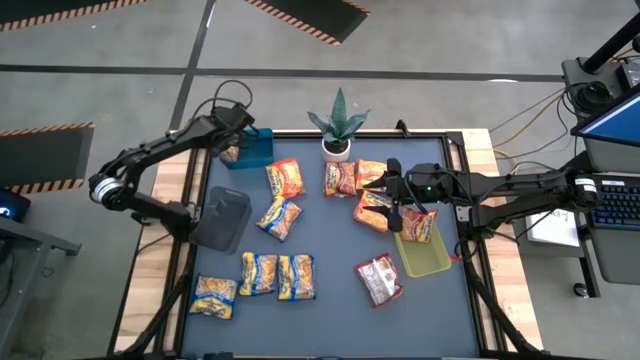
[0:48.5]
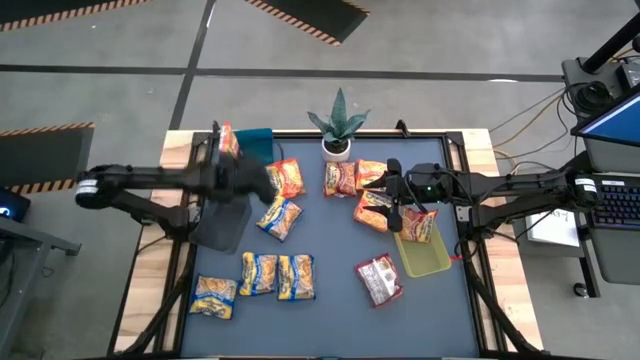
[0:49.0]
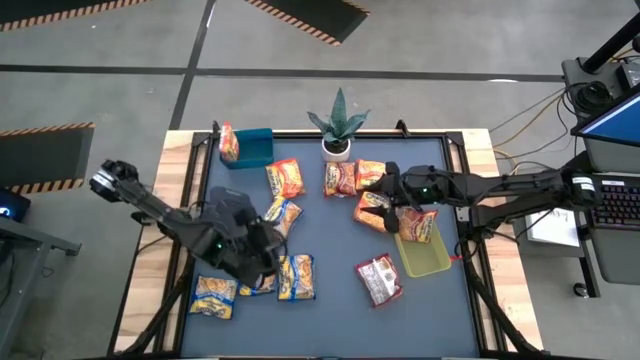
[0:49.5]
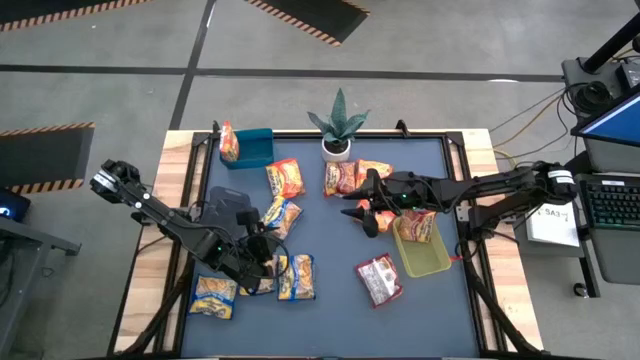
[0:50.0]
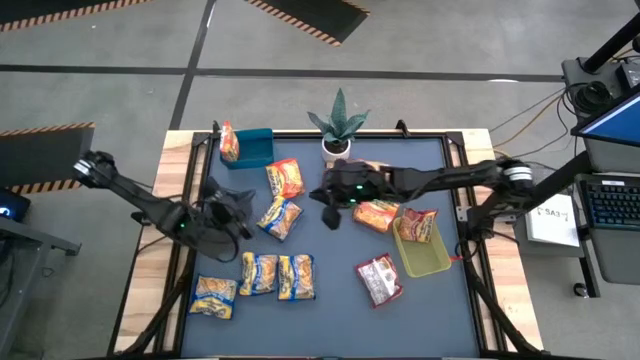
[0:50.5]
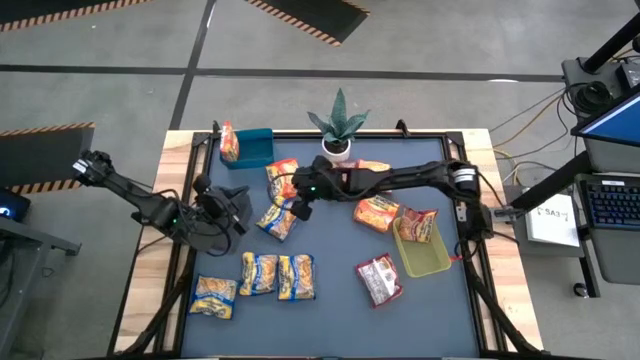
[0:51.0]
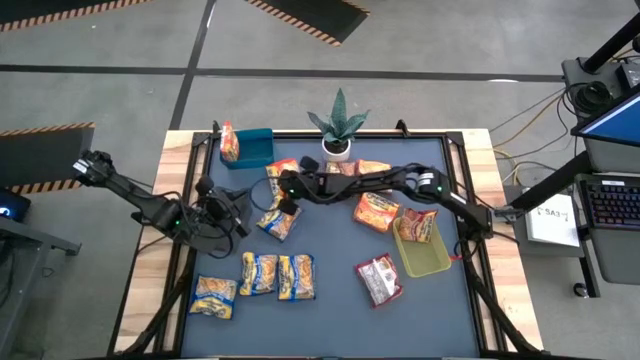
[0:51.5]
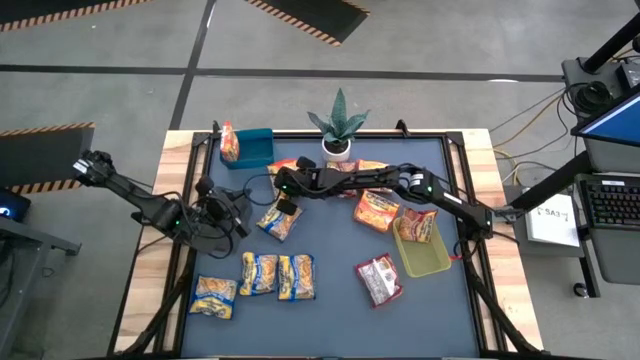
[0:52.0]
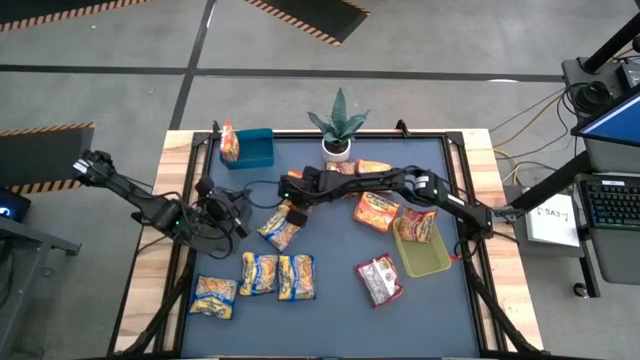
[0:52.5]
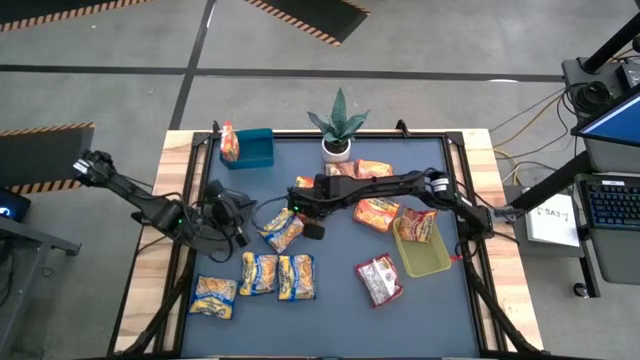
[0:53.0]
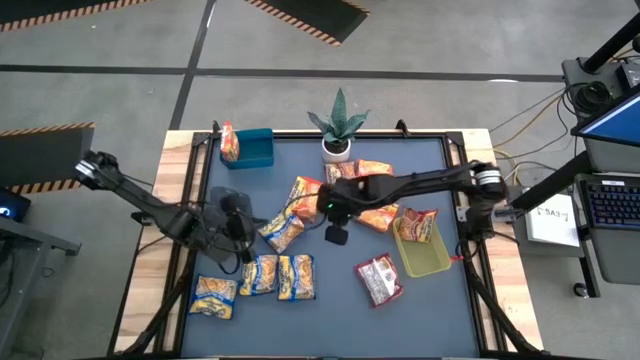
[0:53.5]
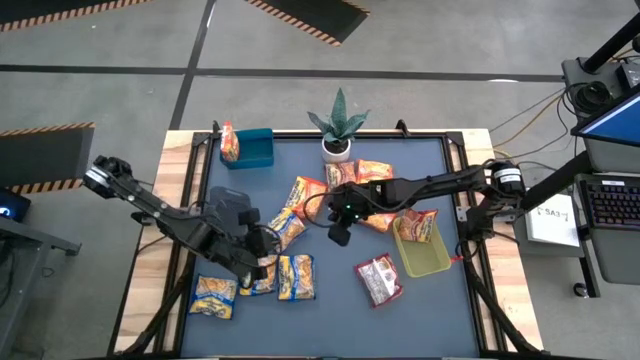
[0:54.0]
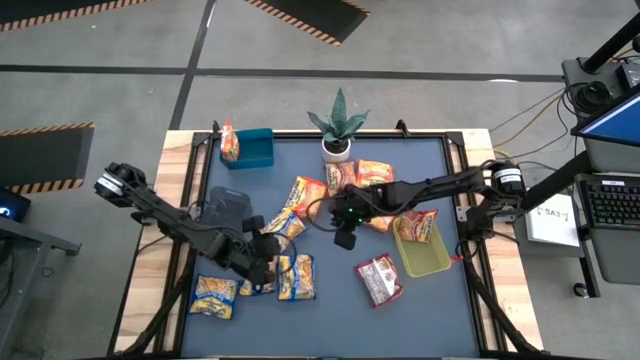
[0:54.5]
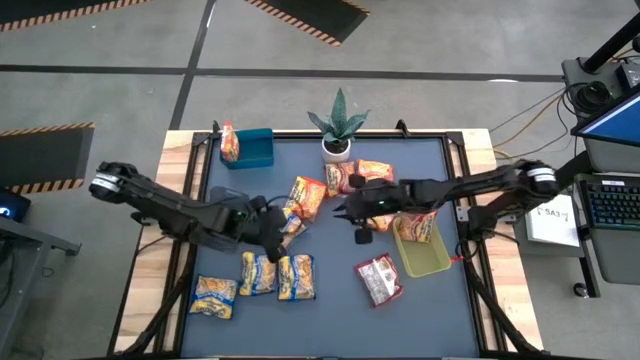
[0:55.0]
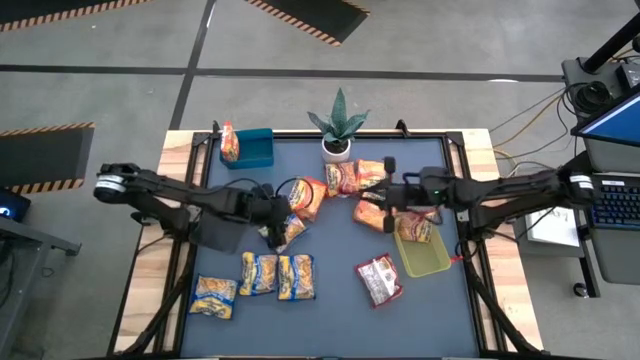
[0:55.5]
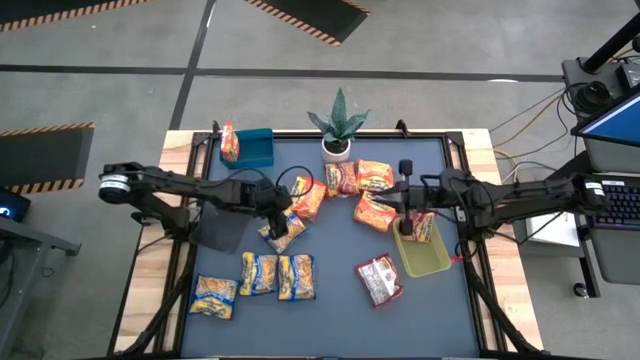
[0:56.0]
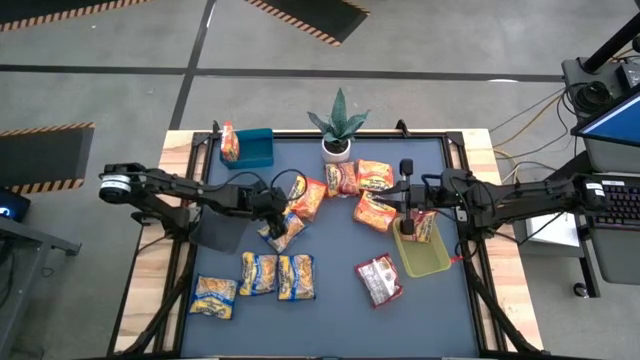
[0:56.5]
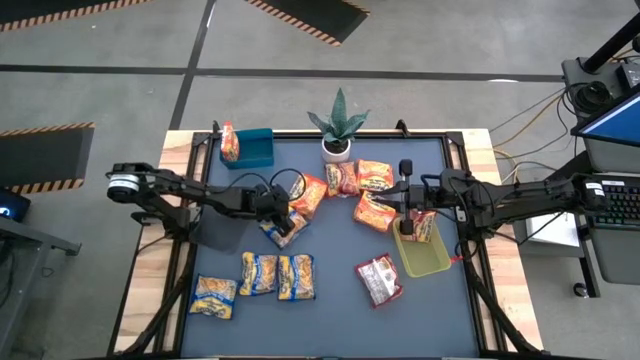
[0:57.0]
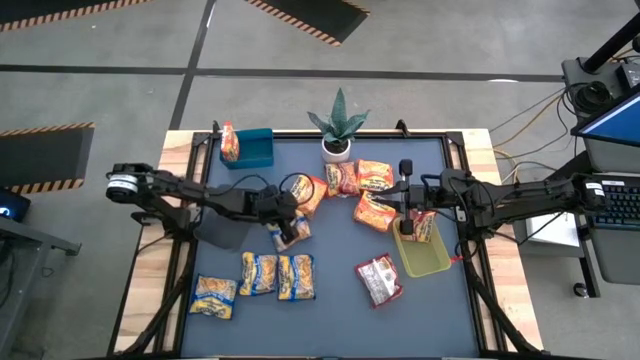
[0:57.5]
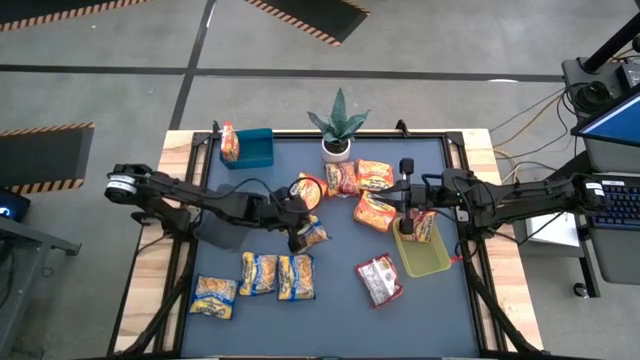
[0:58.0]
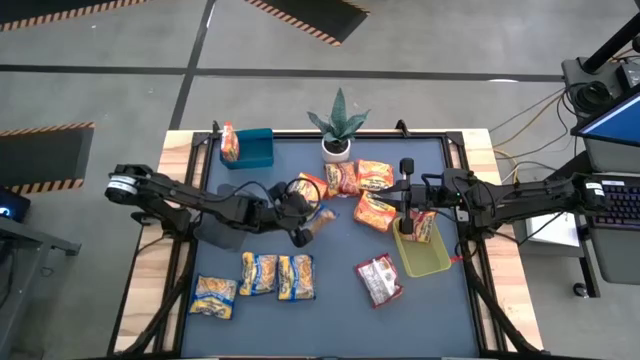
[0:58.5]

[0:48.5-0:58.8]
Task: Sort Maruchan noodles
Put the blue noodle pack into the black bin

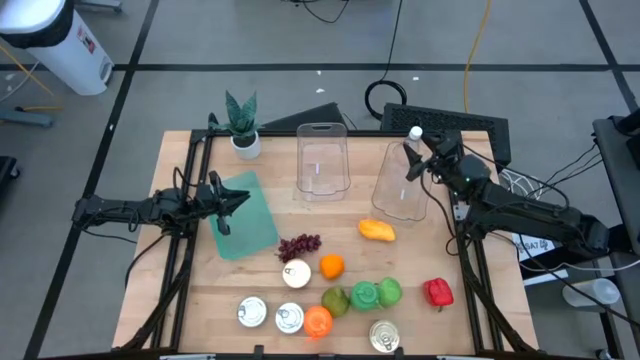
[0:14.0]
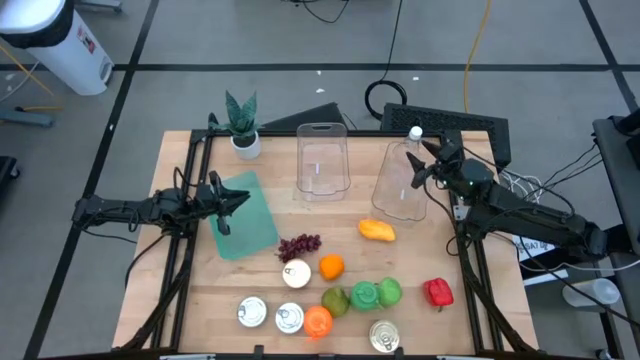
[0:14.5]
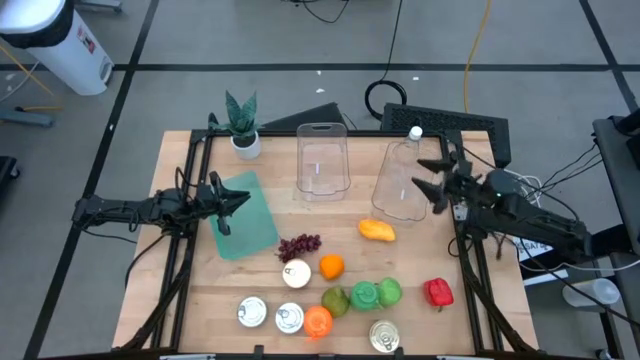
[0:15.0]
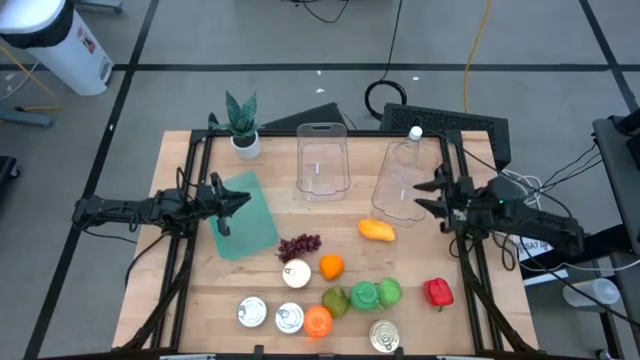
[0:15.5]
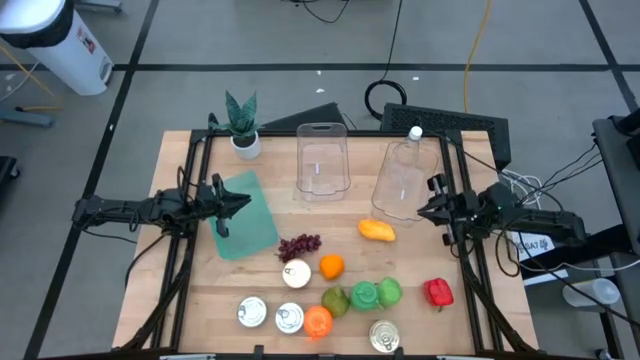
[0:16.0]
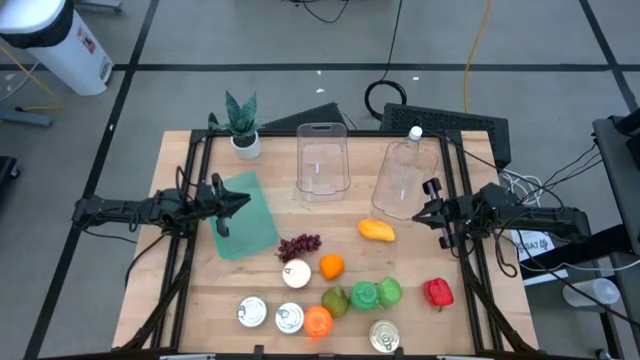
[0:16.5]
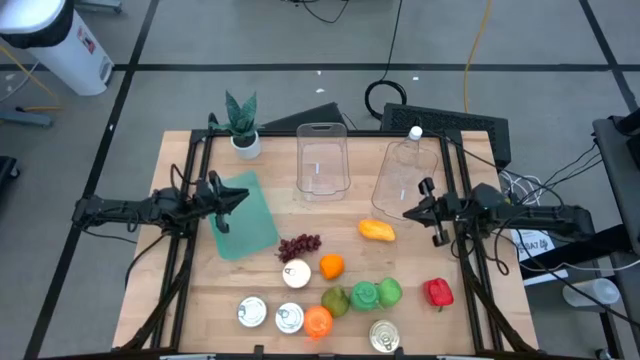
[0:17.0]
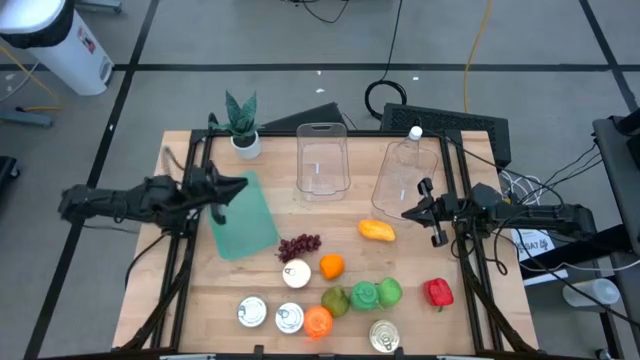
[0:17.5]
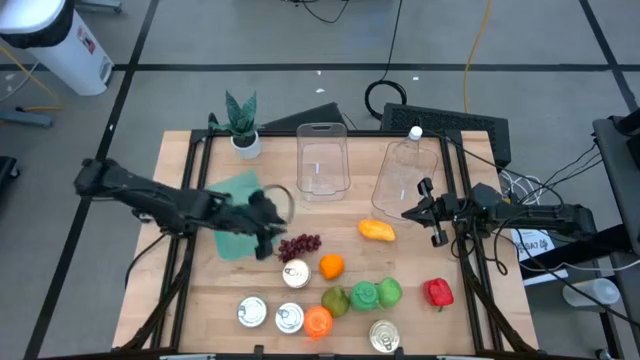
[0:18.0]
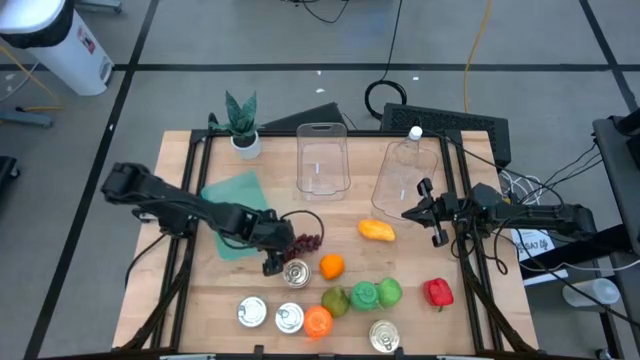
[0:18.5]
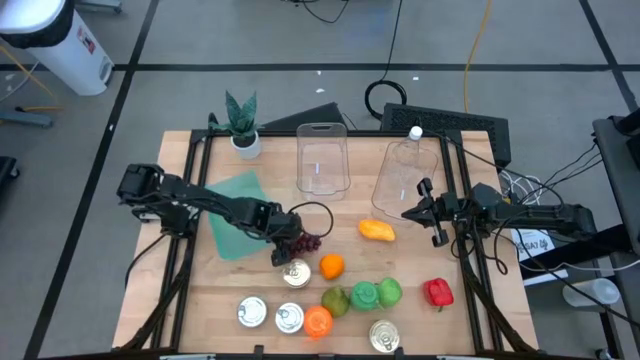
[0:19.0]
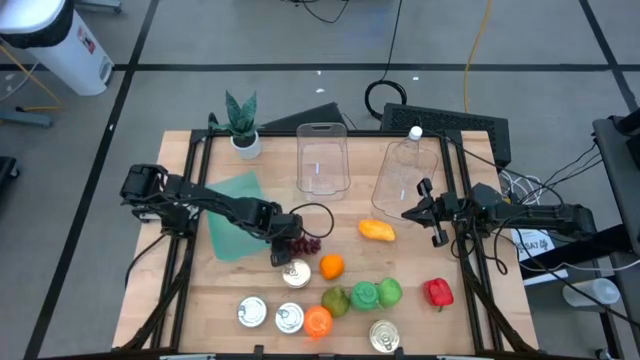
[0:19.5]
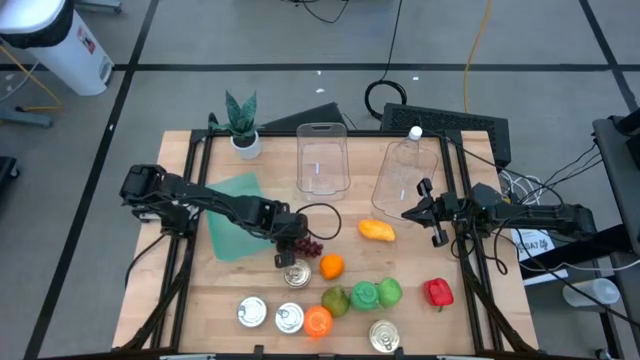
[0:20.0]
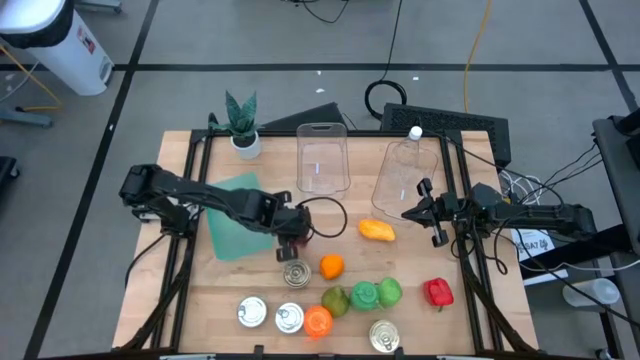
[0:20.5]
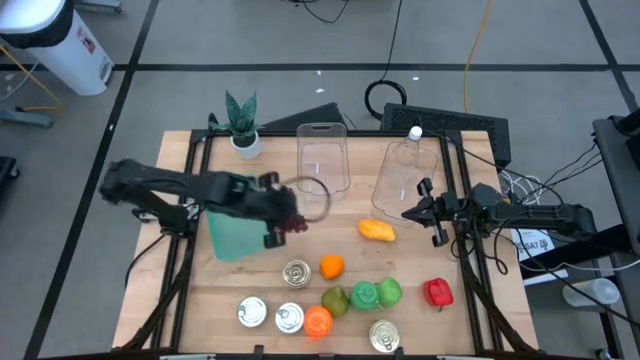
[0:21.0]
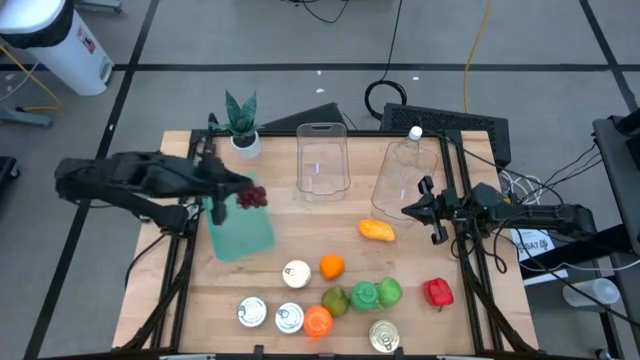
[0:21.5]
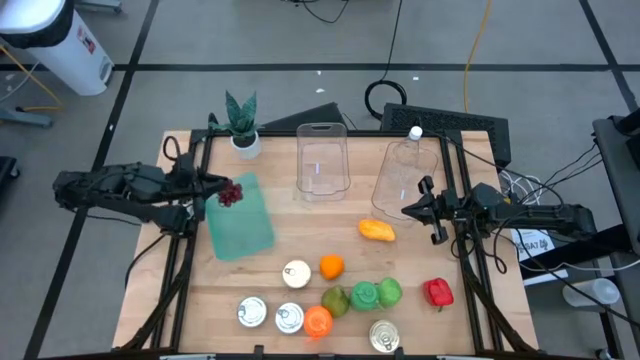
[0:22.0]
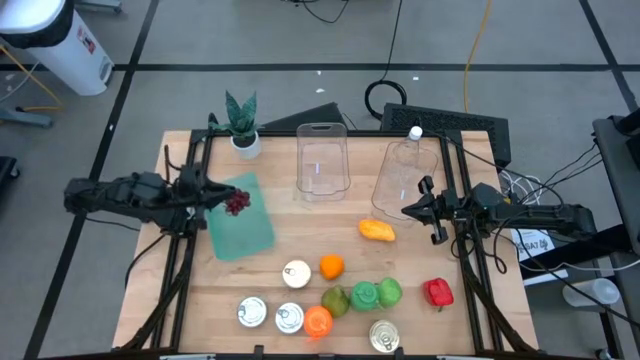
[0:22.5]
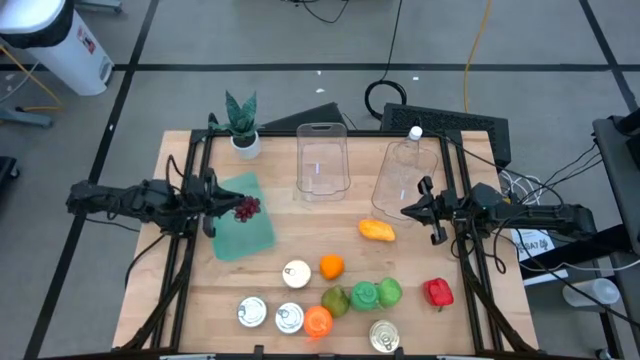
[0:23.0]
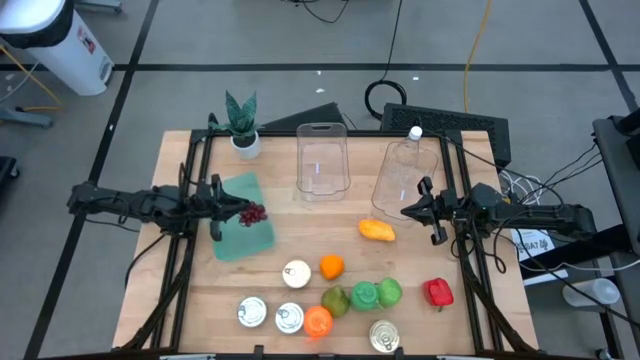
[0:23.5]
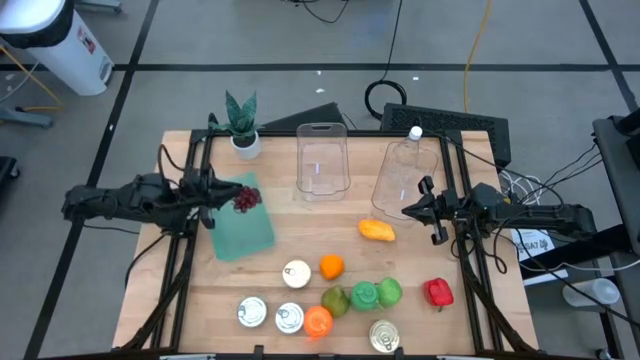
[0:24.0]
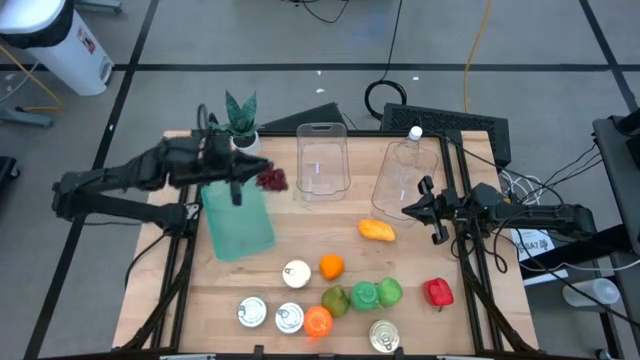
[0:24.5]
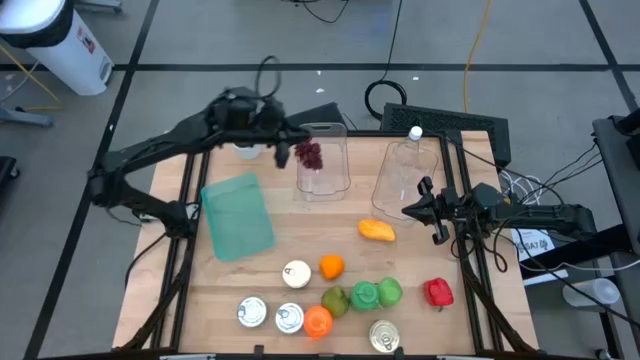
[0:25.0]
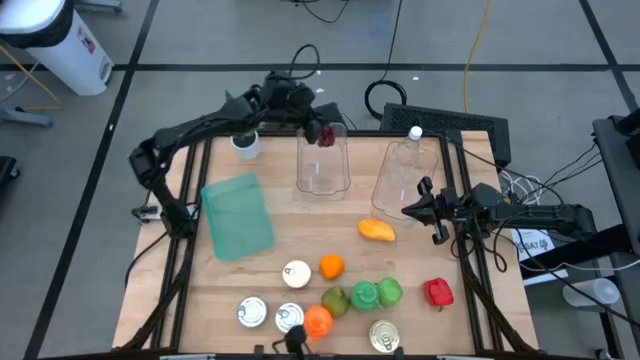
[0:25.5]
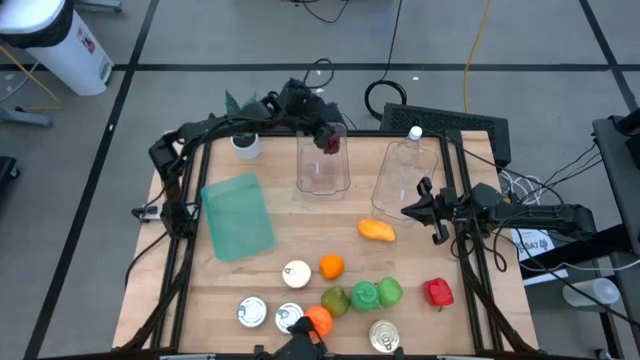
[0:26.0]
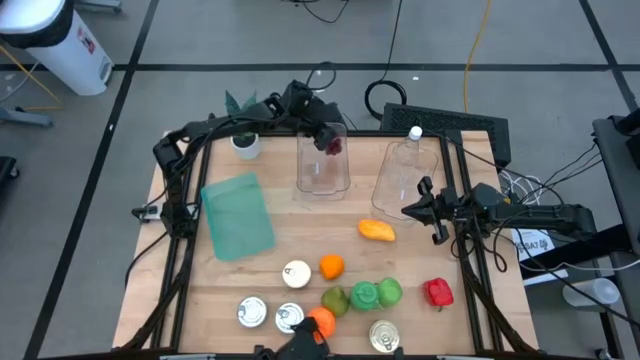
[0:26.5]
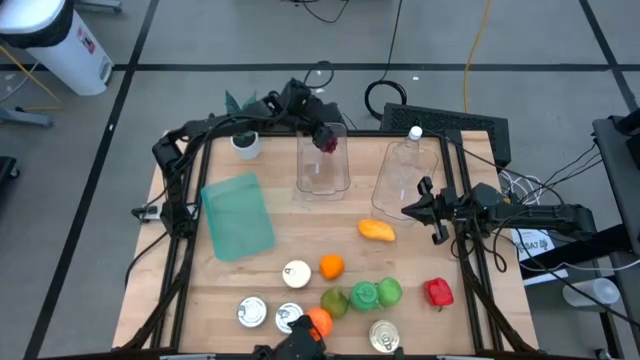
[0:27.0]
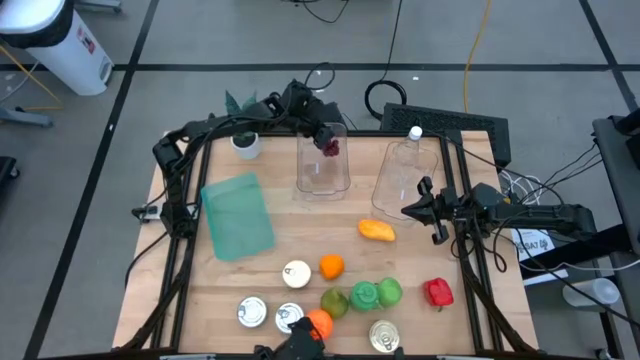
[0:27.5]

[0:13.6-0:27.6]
Task: Pick & Place Food Item
Put the purple grapes into the left transparent bin
